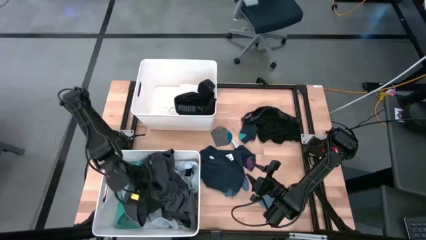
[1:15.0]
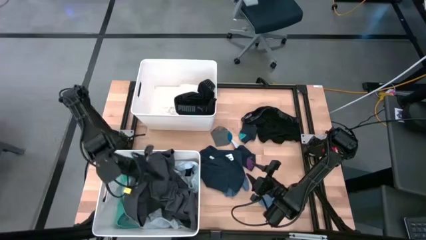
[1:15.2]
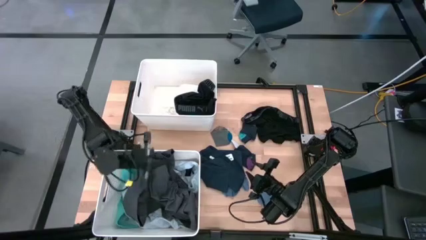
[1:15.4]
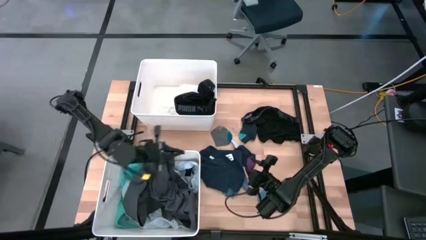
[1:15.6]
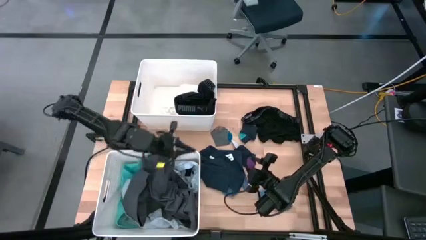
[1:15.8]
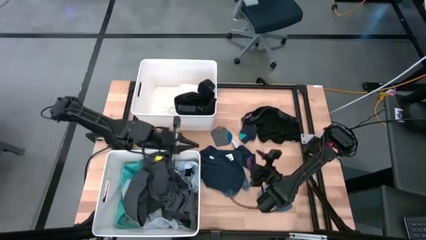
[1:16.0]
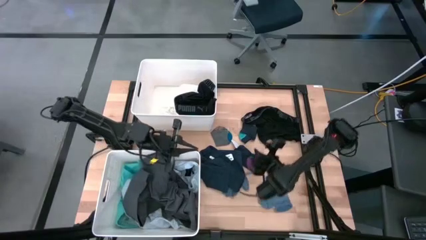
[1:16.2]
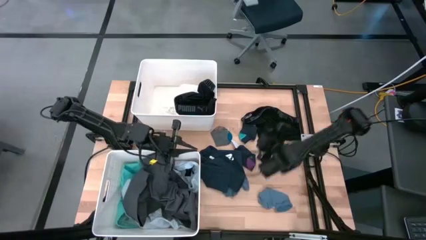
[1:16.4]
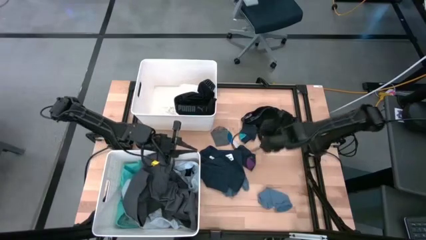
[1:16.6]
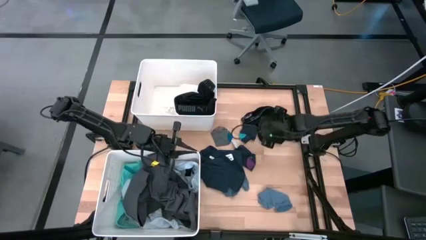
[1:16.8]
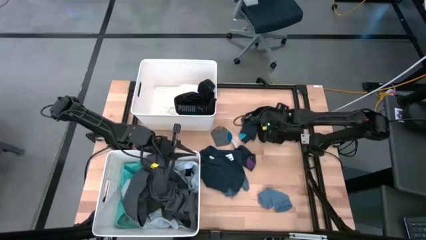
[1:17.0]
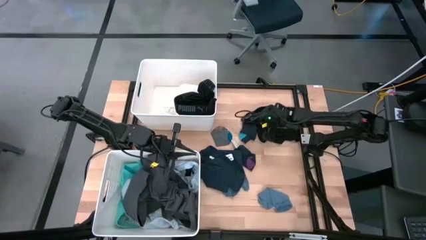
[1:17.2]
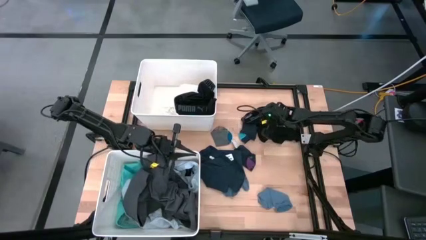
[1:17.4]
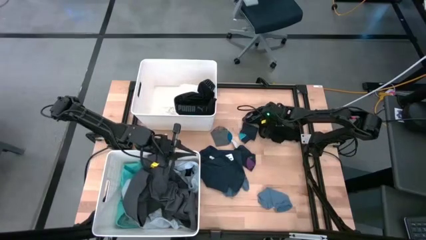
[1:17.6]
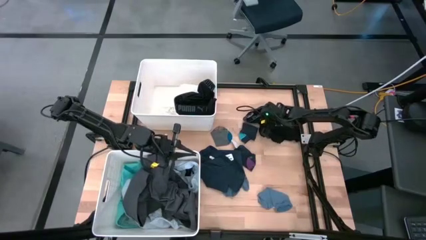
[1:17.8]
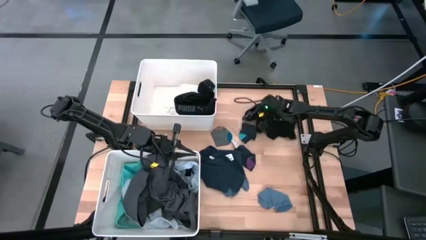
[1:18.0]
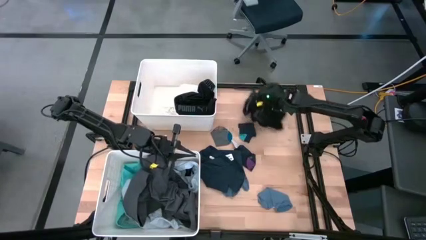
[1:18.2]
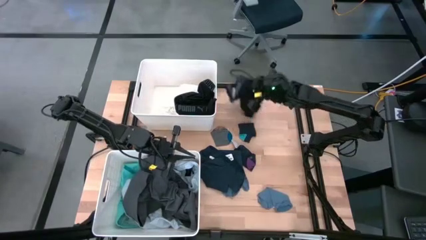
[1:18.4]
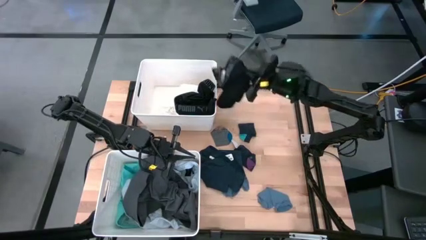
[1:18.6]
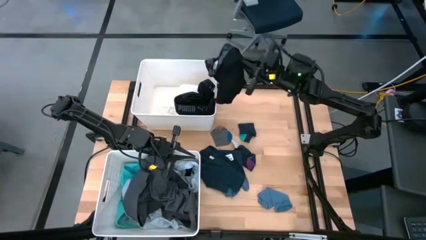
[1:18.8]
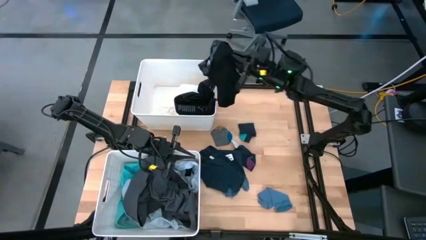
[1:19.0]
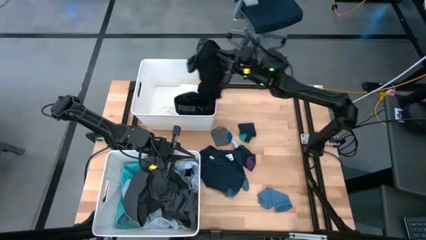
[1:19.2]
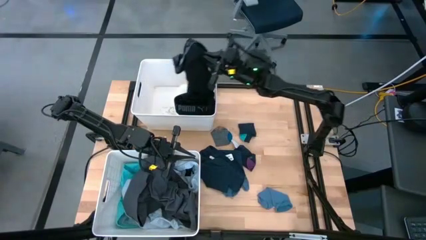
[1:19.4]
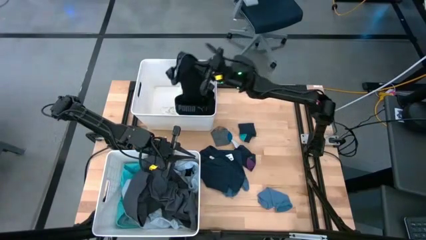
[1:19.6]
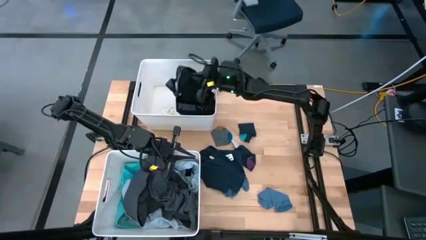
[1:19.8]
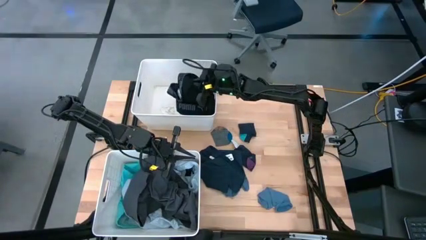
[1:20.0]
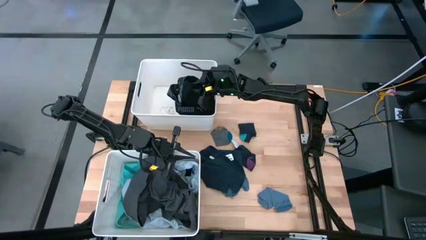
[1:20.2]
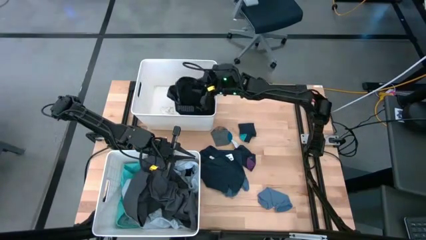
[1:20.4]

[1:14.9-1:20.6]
Task: Sort clothes
Put the black boxer into the top laundry organizer

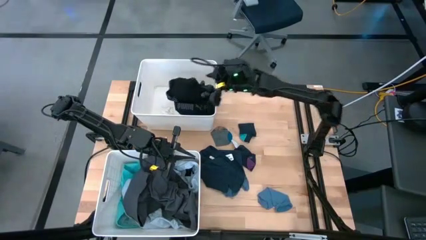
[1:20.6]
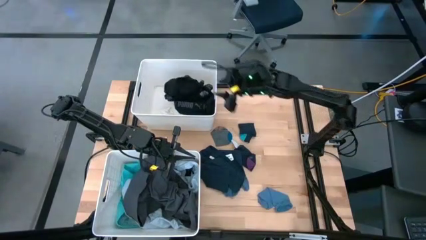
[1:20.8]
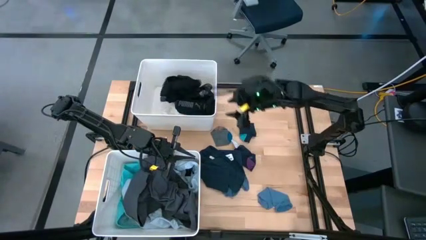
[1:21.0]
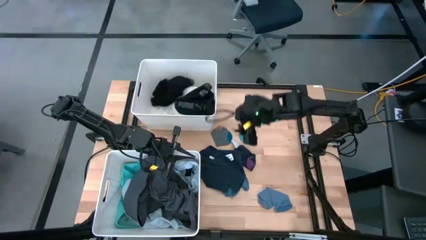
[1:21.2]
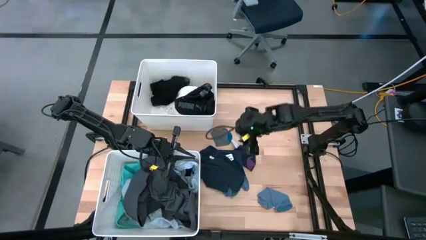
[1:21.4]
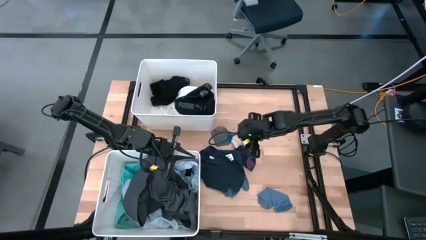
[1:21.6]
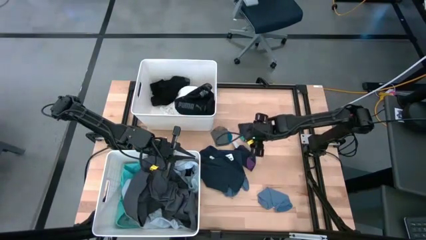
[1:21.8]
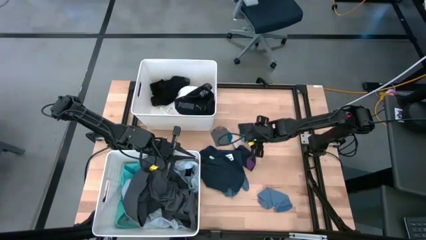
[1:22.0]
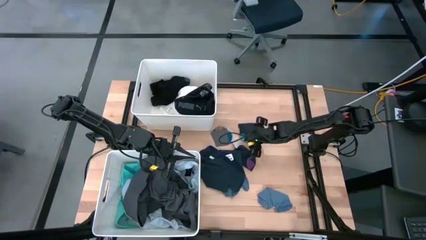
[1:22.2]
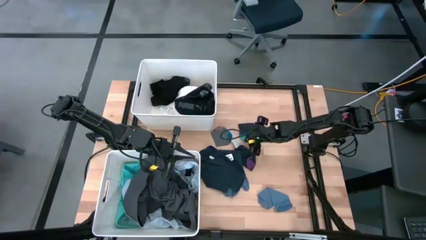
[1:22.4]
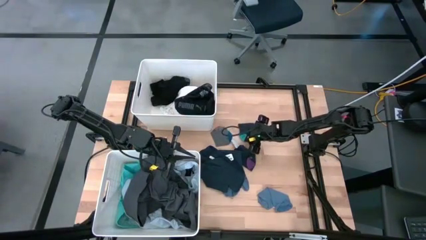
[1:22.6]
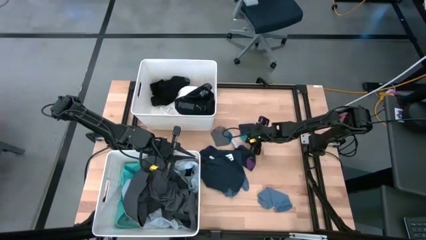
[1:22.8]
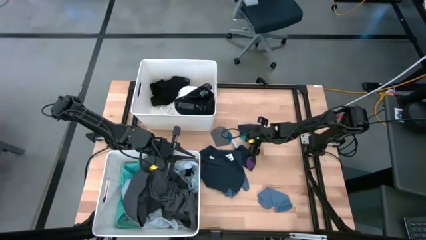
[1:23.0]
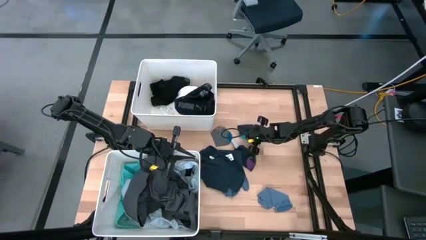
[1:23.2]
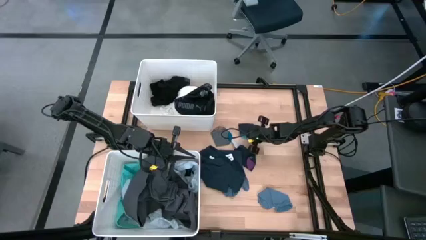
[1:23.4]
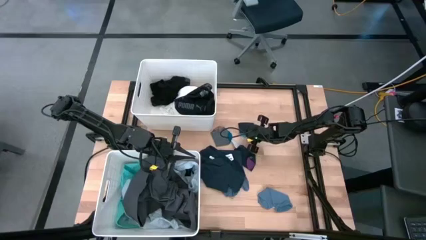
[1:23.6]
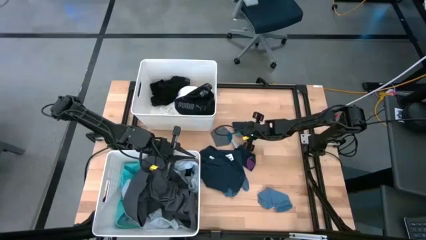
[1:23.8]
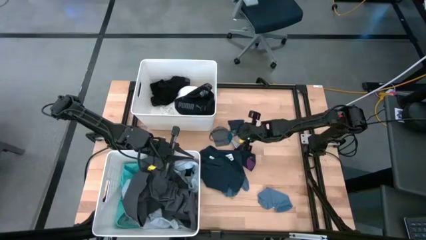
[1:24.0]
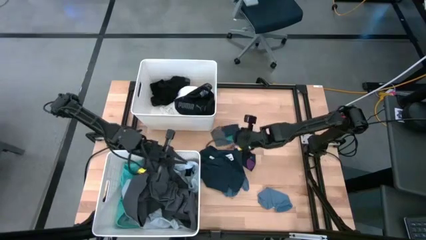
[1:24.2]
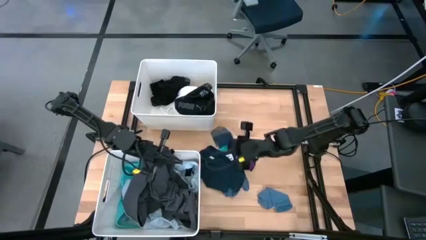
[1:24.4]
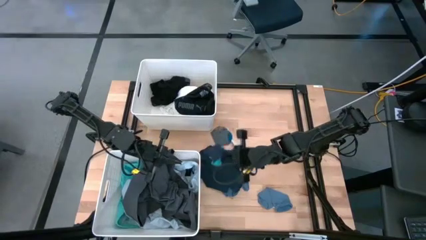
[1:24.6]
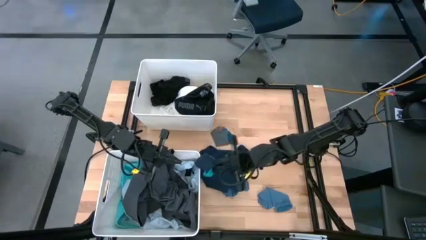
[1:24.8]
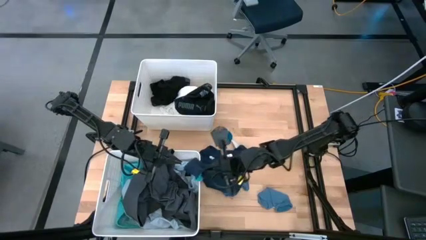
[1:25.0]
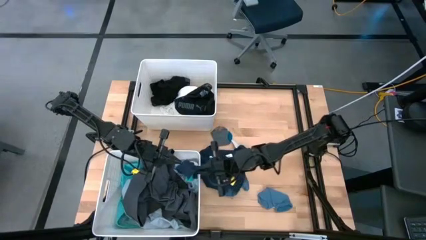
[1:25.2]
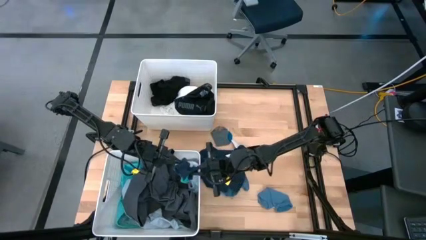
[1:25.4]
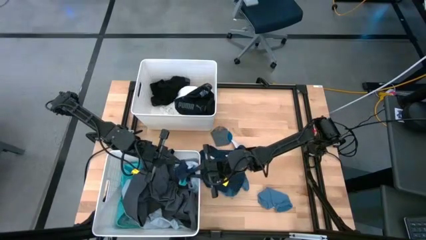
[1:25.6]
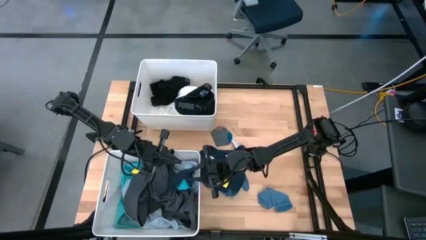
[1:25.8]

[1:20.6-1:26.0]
Put the top dark blue sock into the bottom laundry organizer

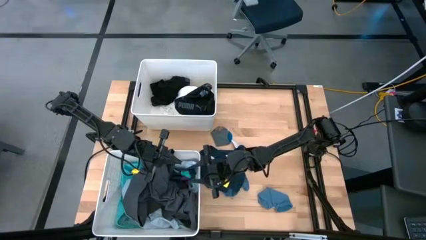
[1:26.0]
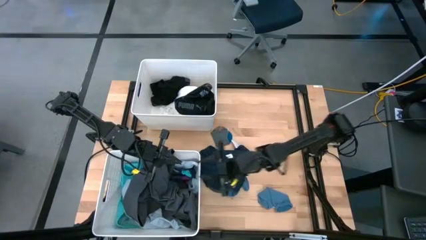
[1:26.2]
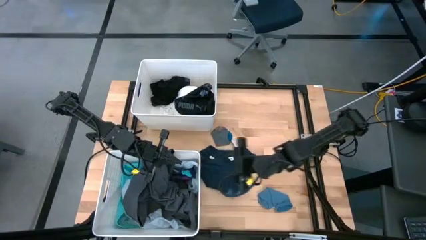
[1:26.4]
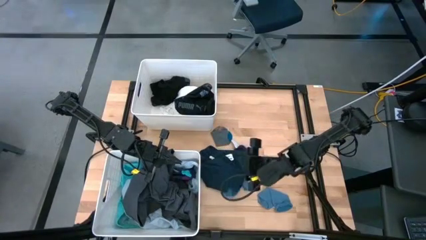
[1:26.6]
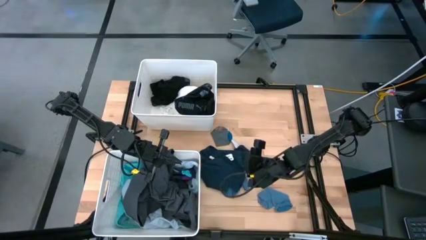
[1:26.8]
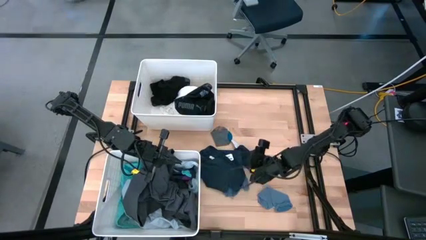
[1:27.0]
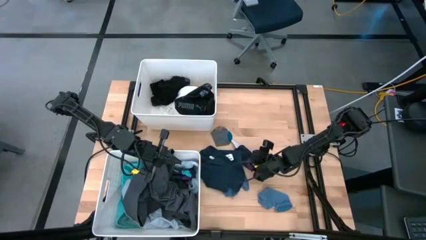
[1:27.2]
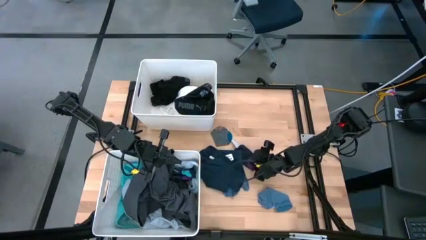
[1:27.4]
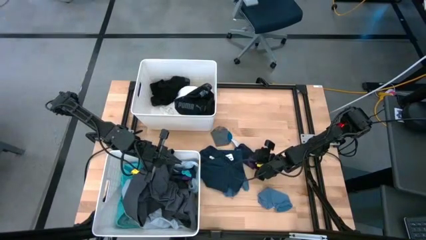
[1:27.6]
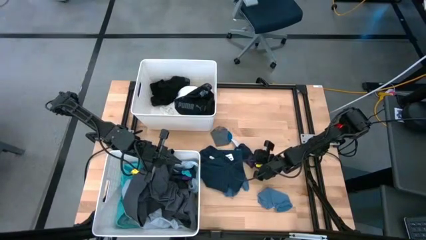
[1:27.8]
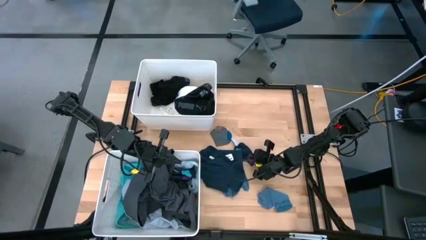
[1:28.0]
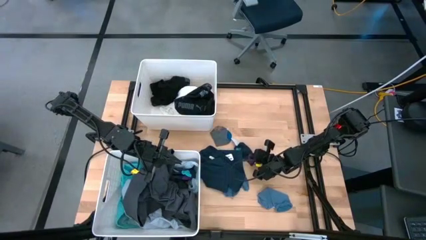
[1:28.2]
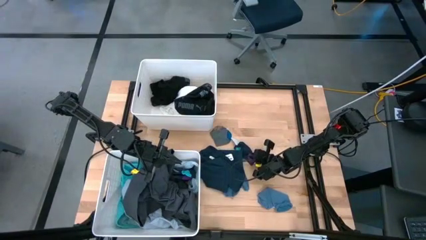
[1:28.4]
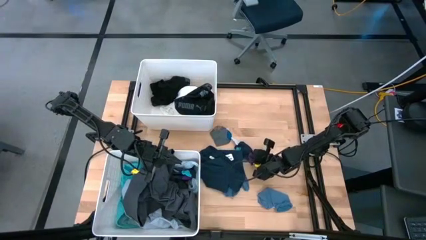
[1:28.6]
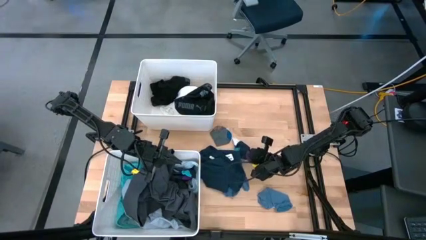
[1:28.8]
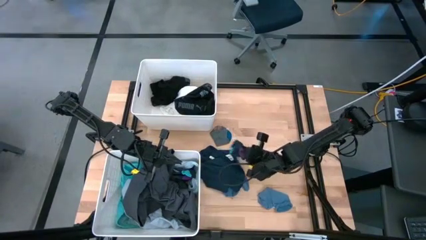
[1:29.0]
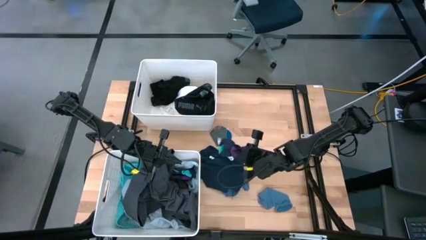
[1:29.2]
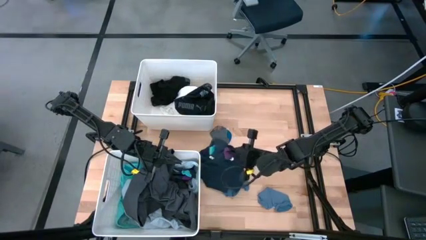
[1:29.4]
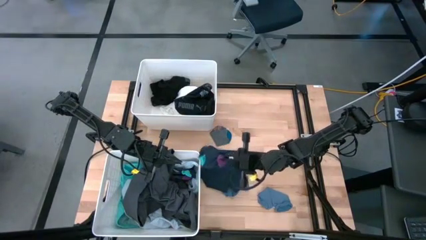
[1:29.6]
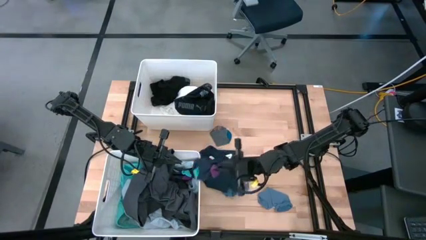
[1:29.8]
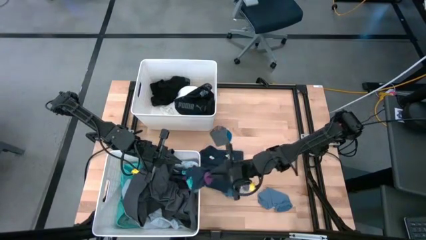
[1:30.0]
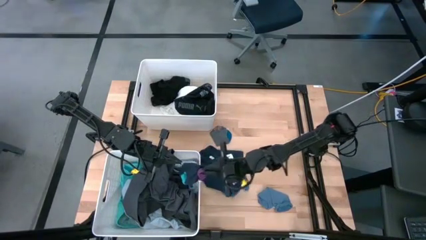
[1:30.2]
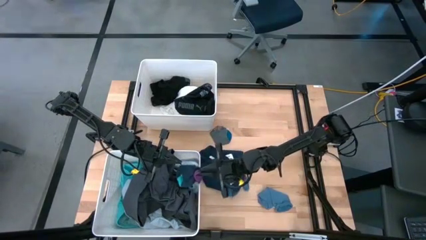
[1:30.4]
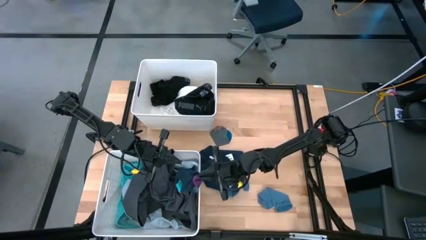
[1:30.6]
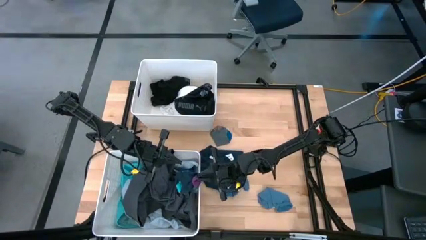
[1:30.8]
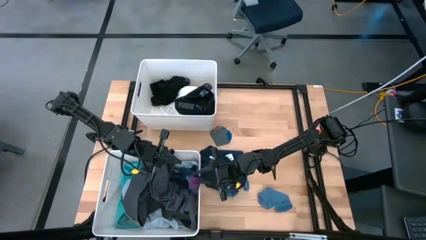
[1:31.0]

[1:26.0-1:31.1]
Put the dark blue sock into the bottom laundry organizer

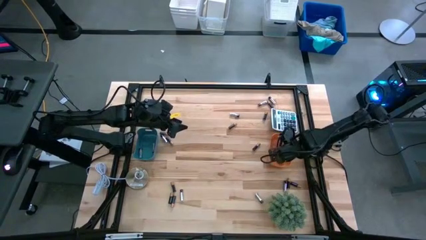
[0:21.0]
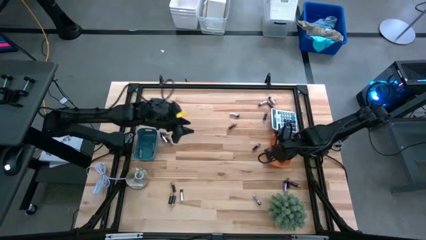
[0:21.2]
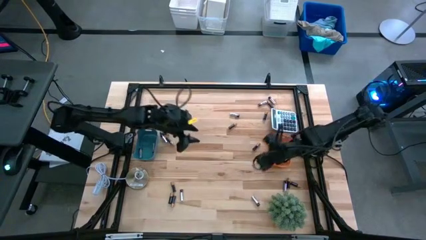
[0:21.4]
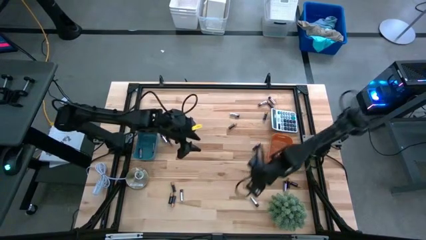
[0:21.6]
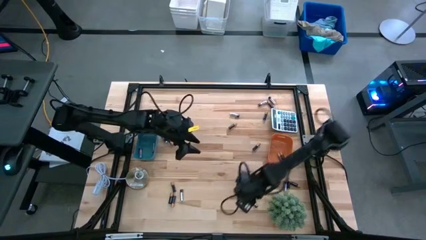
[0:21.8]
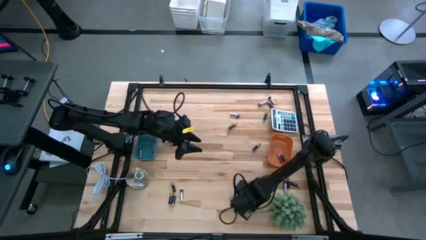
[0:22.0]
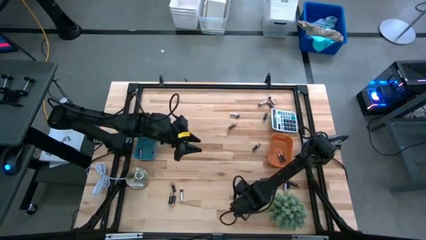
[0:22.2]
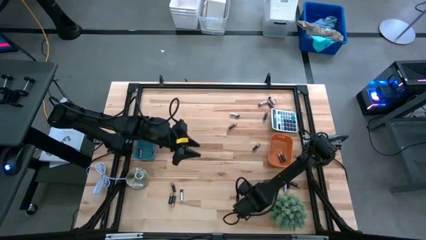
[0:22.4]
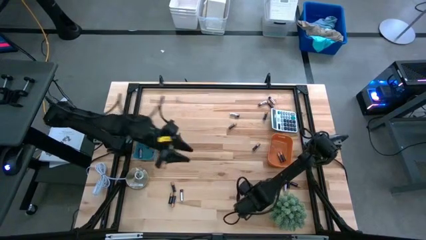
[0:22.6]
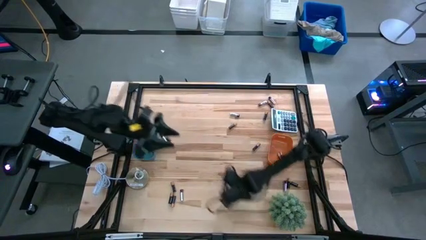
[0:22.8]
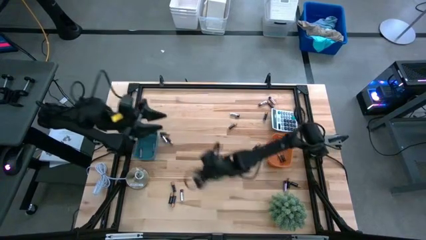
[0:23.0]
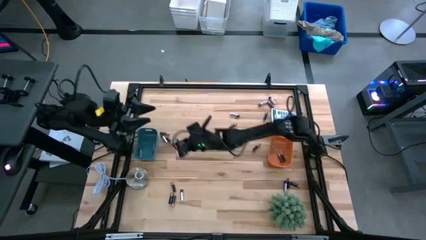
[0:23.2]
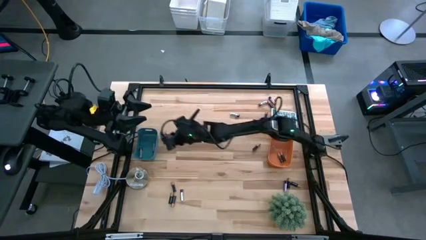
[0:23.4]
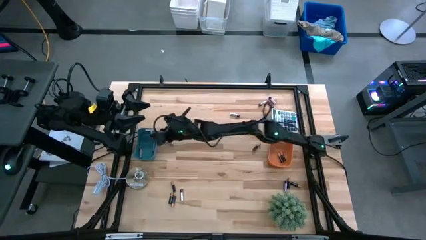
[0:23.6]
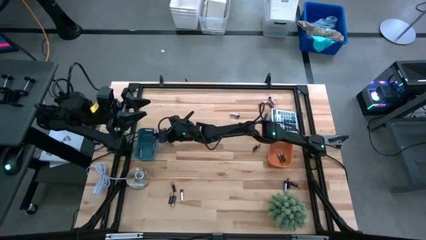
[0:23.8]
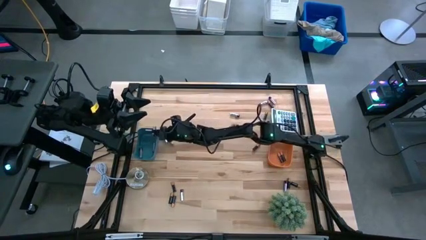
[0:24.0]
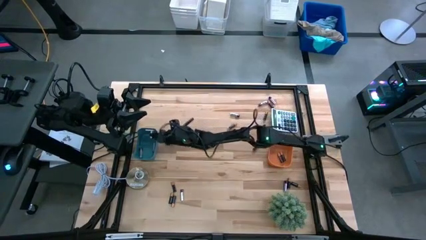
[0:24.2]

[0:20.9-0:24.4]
Task: Sort batteries
Put the silver battery into the blue bin
